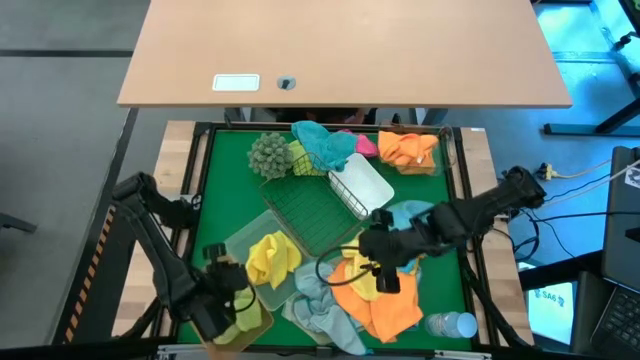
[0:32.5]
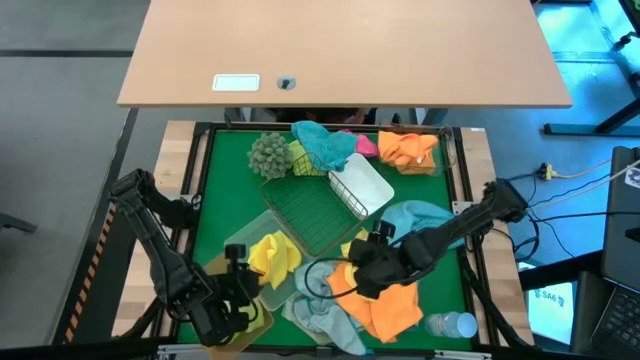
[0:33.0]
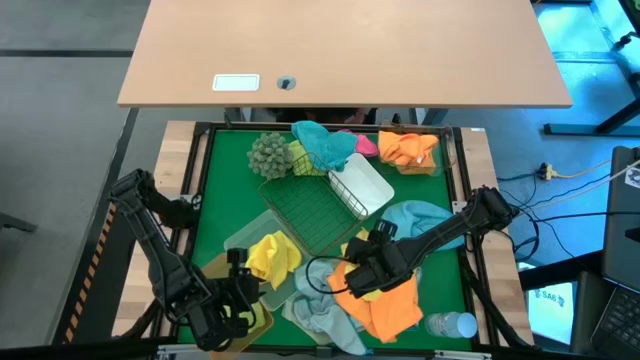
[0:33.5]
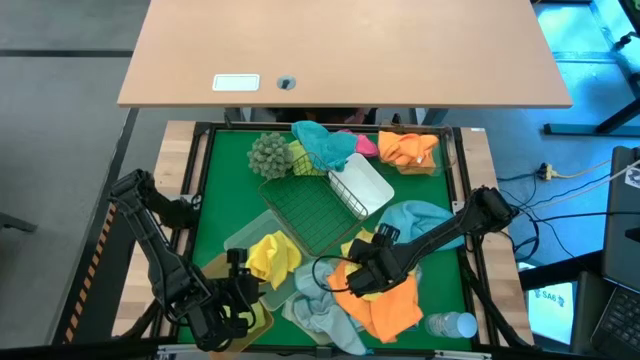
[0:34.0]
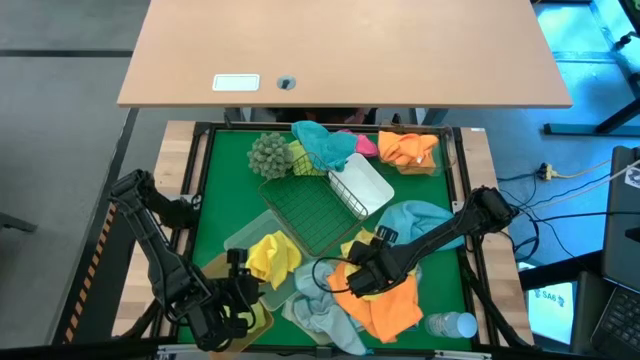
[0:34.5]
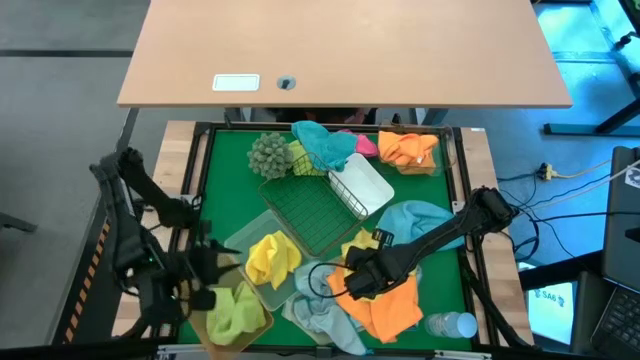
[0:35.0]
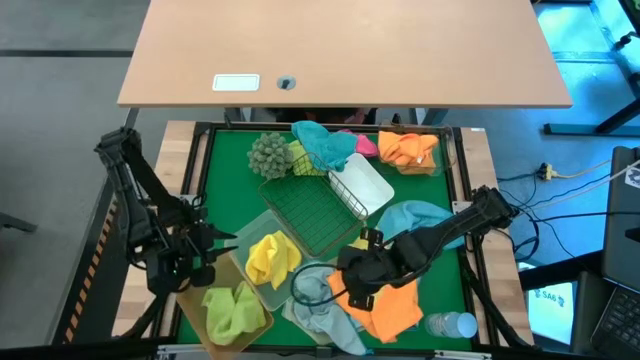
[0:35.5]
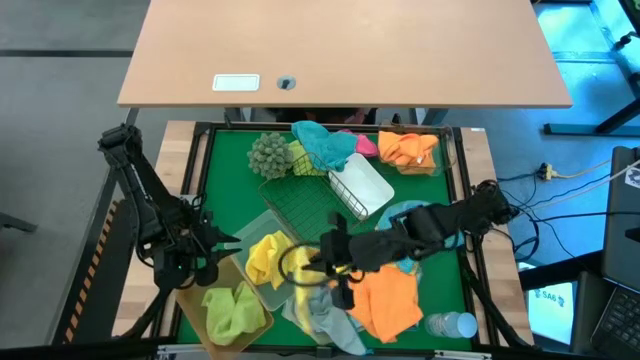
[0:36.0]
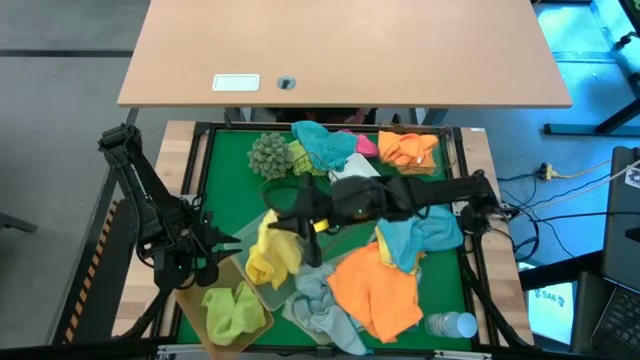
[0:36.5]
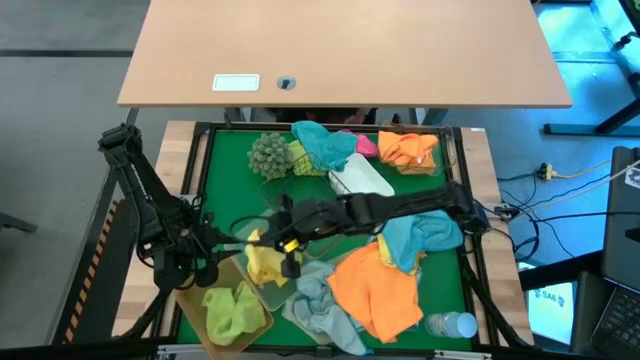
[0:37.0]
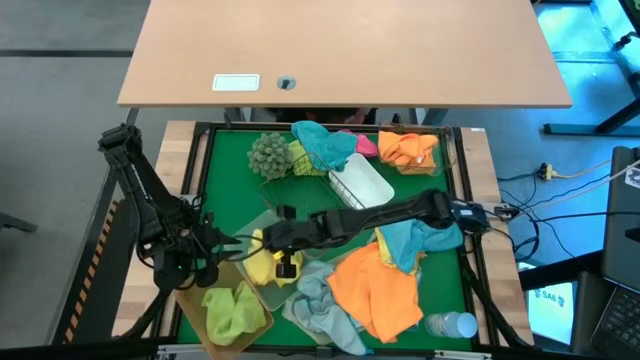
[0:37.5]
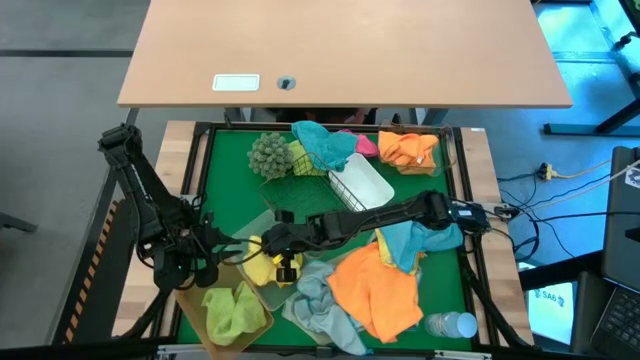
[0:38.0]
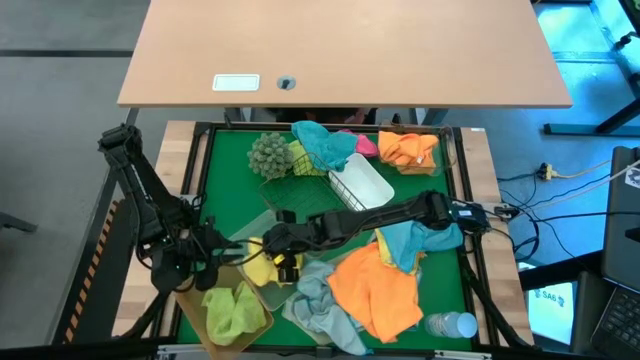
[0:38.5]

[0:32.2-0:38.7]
Task: Sort microfiber towel by color & place in baskets
Put the yellow towel into the gray bin

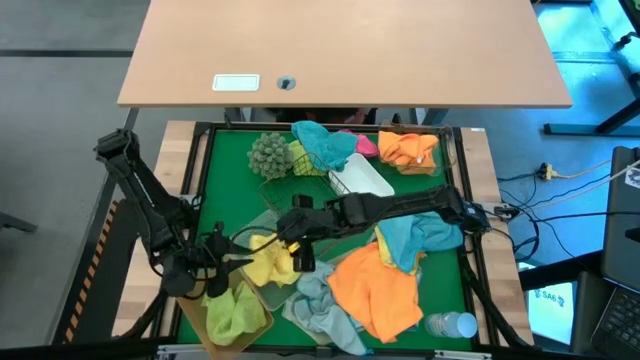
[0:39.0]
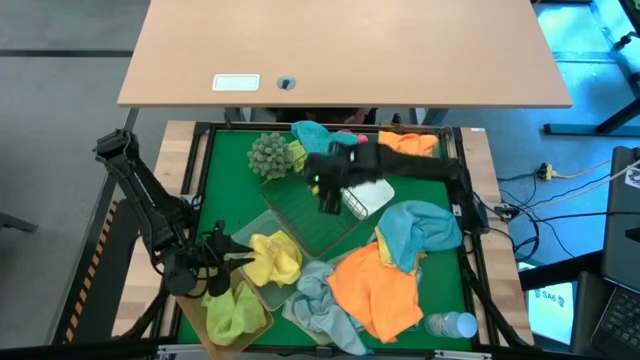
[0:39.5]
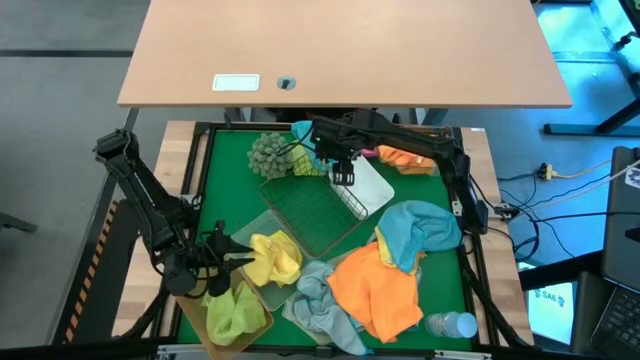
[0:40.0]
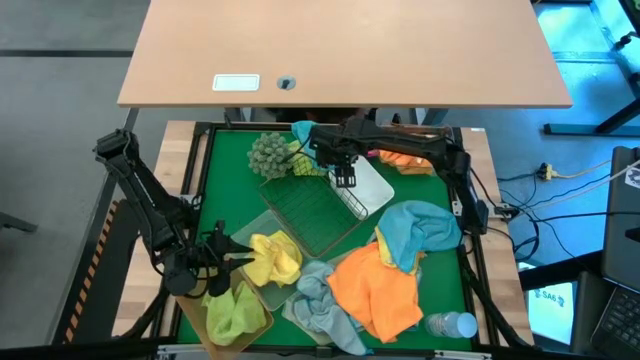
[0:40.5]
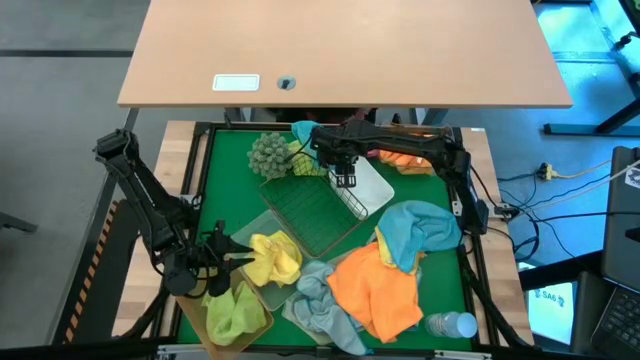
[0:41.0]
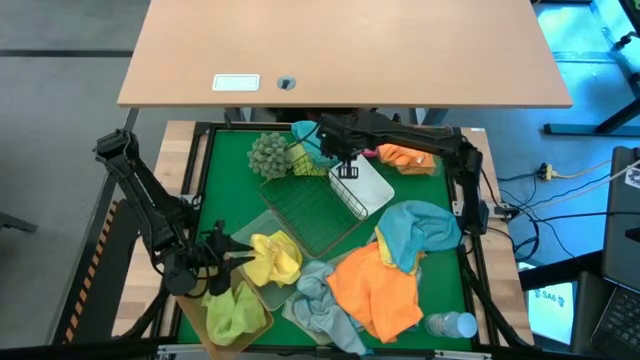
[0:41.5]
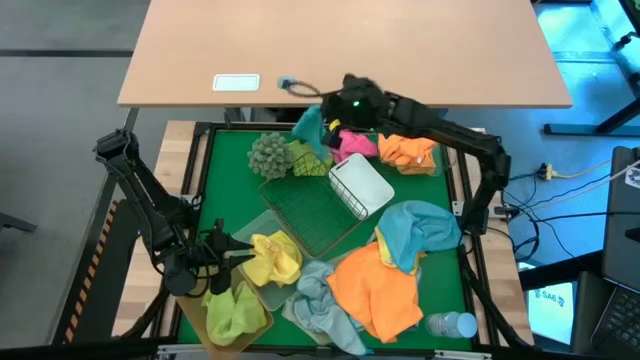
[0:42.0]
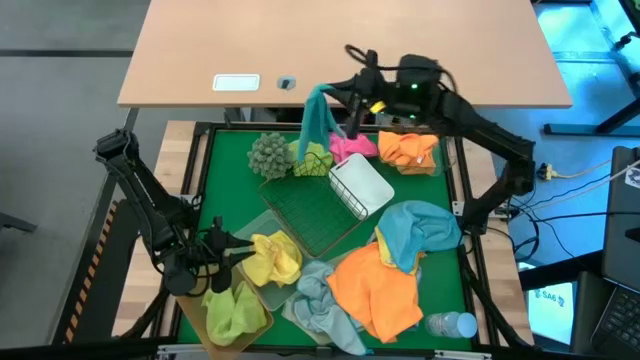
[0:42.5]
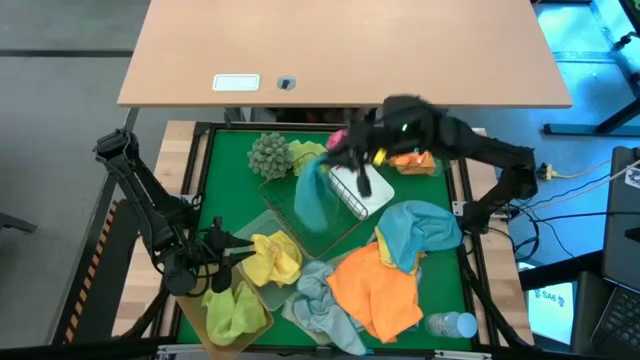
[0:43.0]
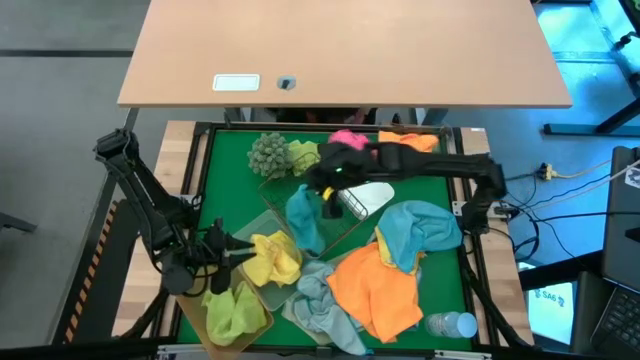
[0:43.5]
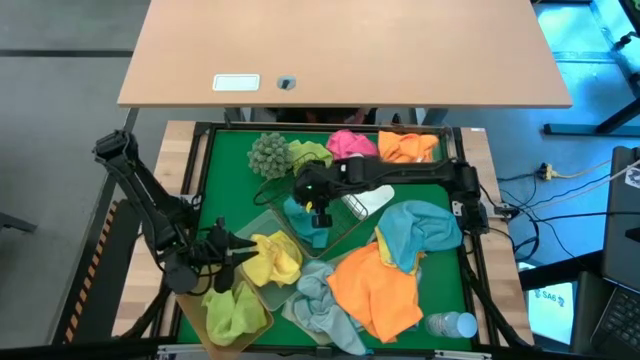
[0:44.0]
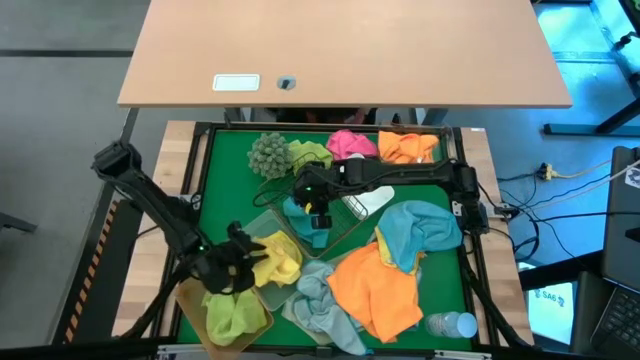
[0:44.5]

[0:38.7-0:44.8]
Put the blue towel into the black bin

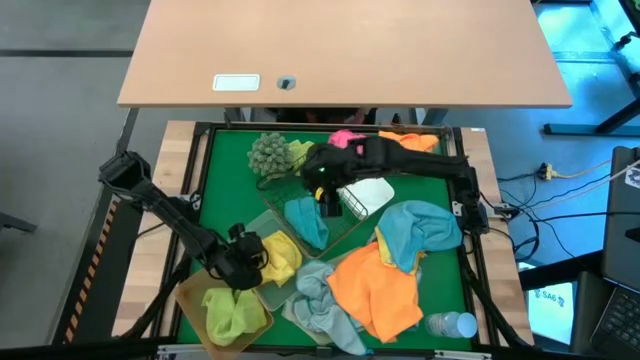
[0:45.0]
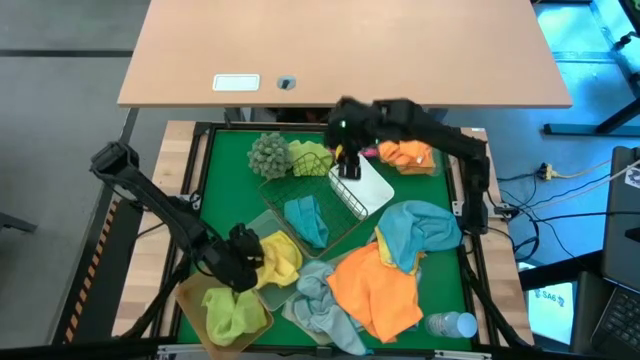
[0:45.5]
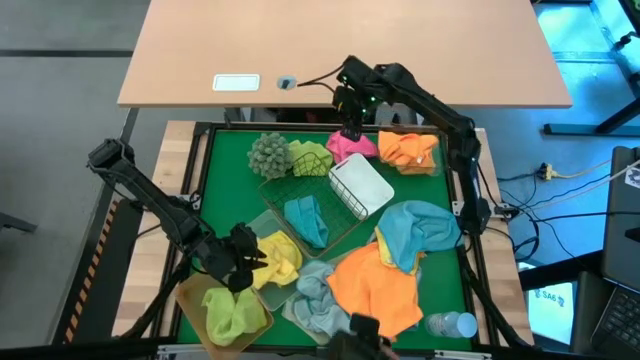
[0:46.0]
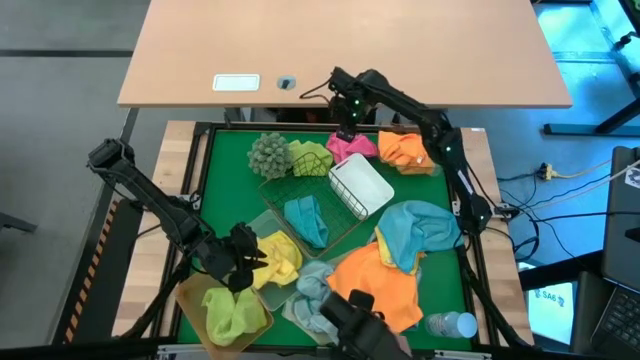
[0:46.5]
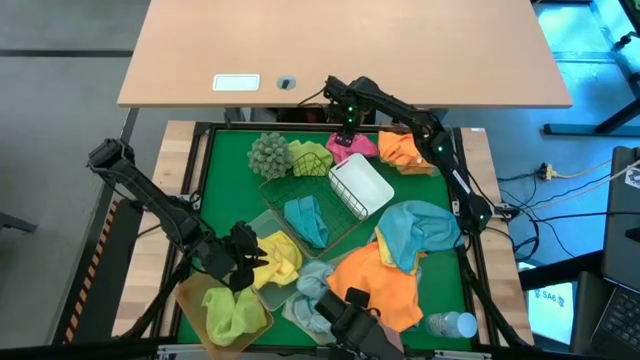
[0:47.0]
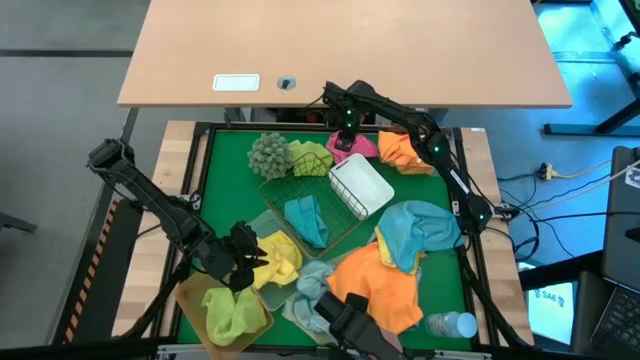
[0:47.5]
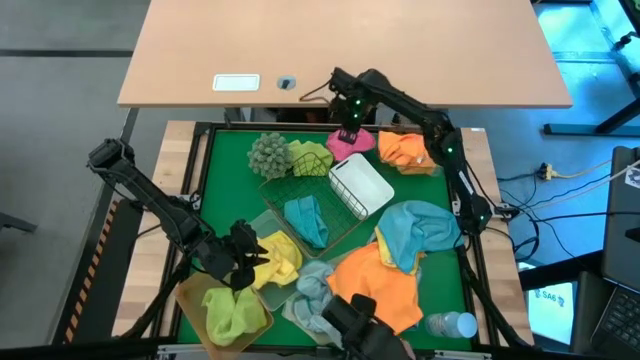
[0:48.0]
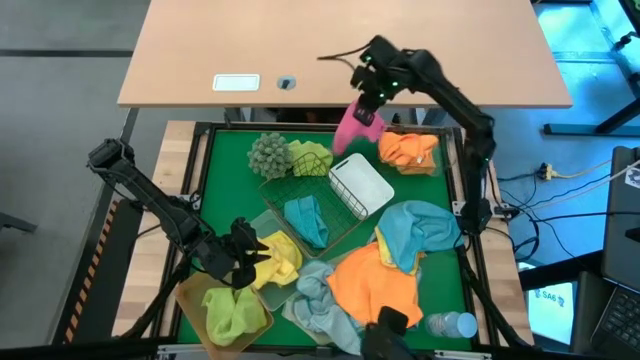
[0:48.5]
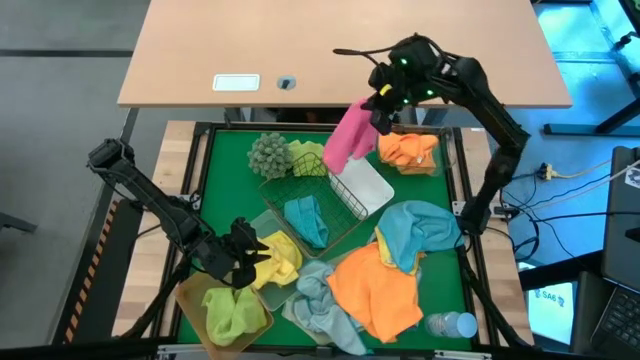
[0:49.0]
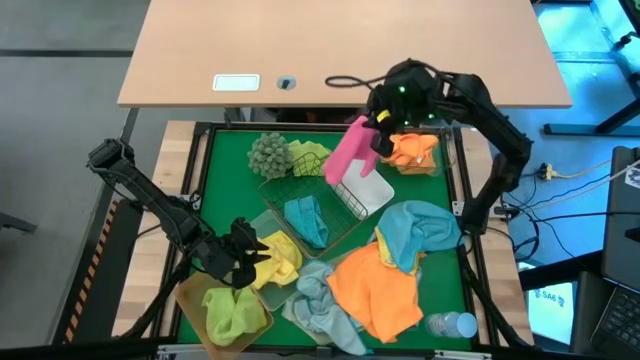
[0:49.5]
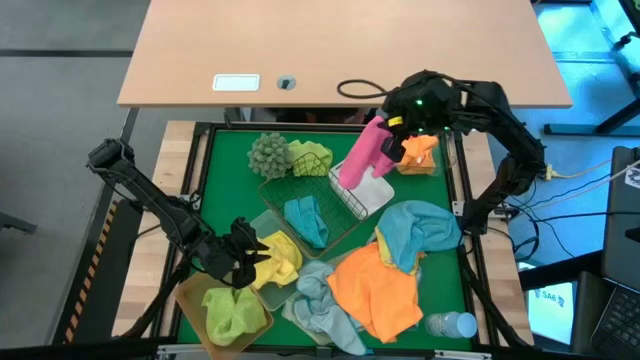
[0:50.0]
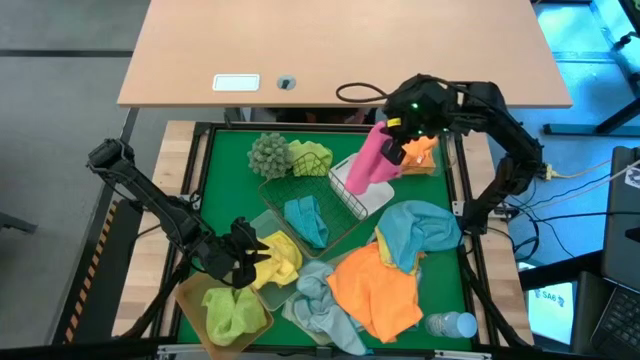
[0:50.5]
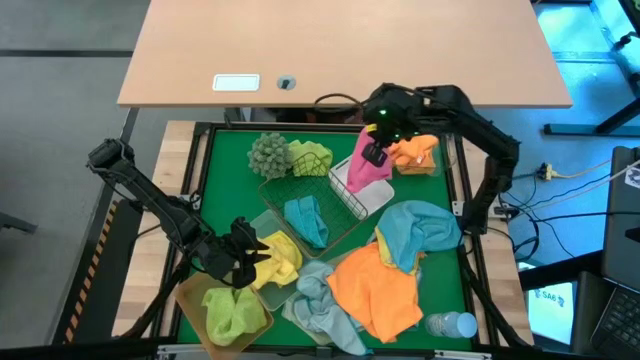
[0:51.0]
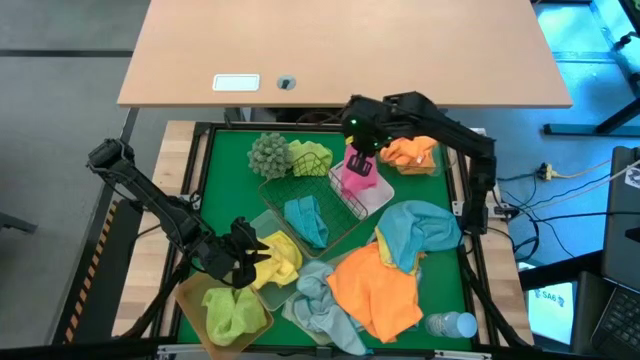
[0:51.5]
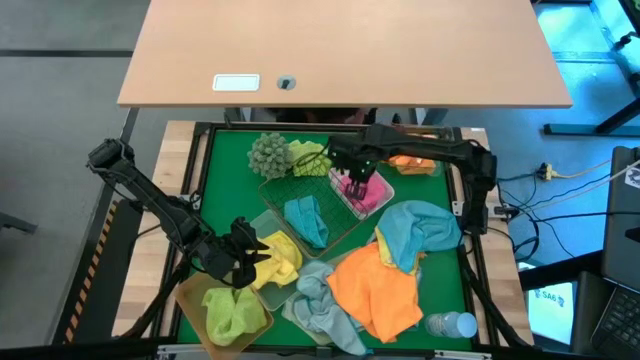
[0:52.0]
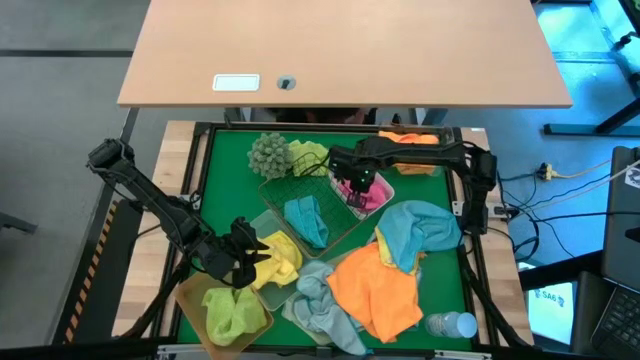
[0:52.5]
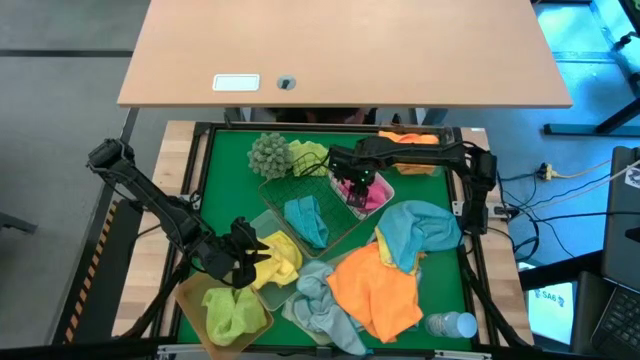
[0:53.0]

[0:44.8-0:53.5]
Put the pink towel into the white bin
